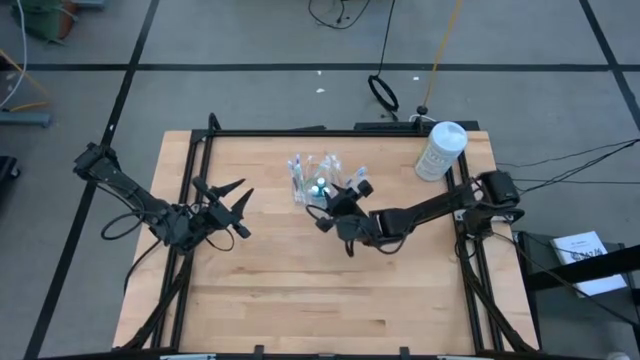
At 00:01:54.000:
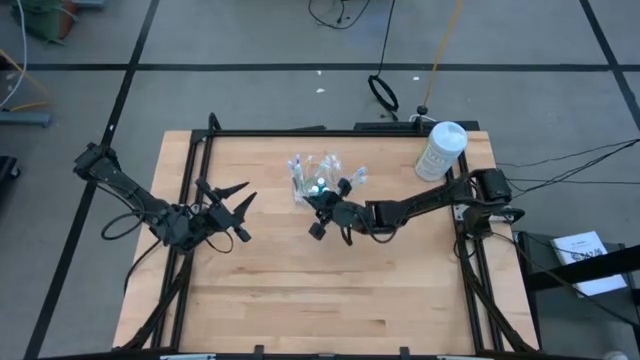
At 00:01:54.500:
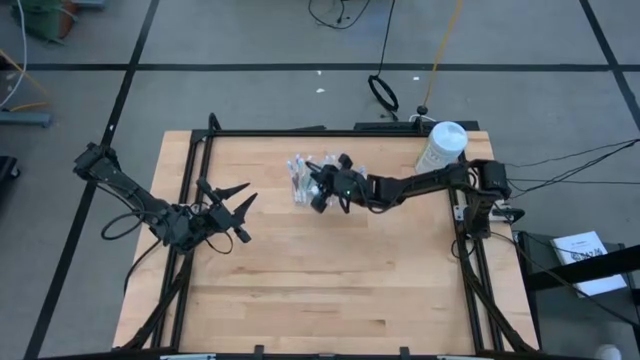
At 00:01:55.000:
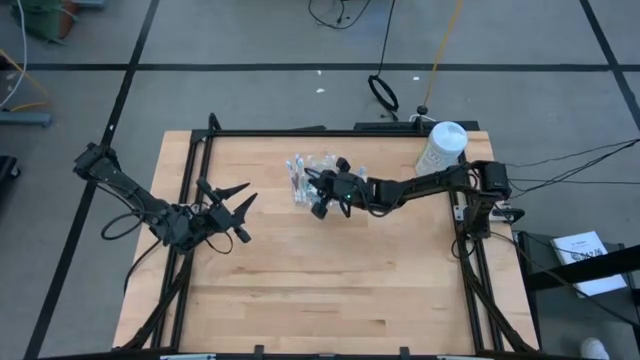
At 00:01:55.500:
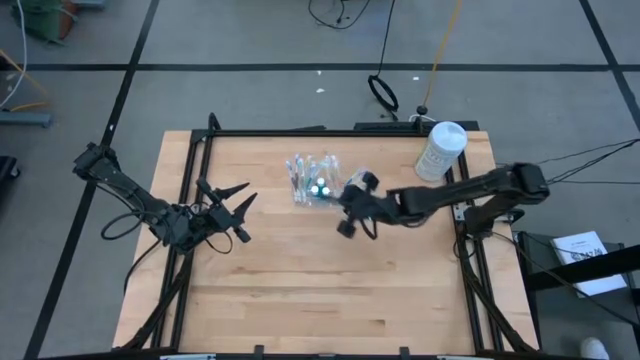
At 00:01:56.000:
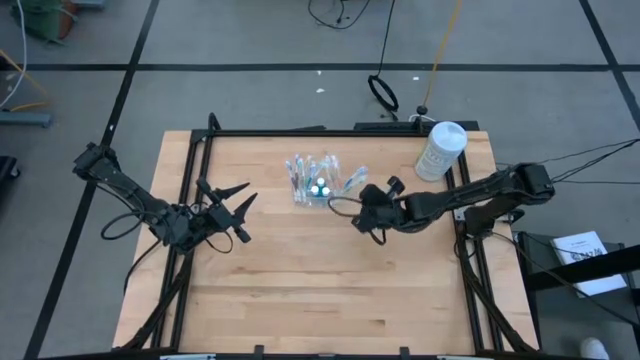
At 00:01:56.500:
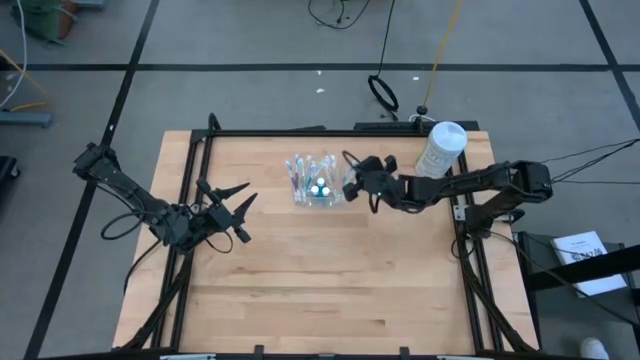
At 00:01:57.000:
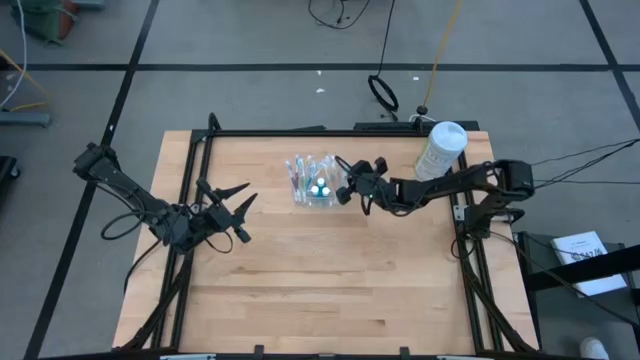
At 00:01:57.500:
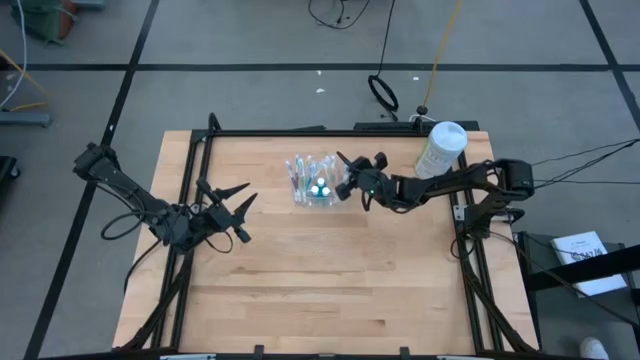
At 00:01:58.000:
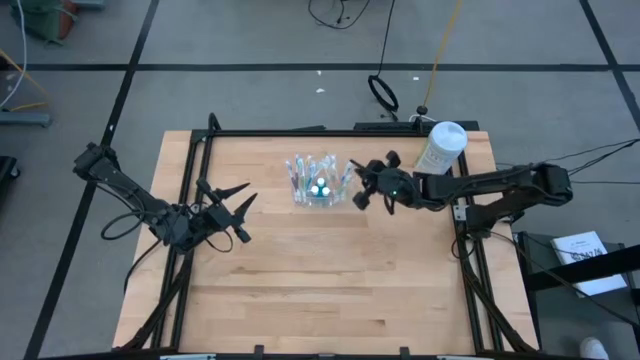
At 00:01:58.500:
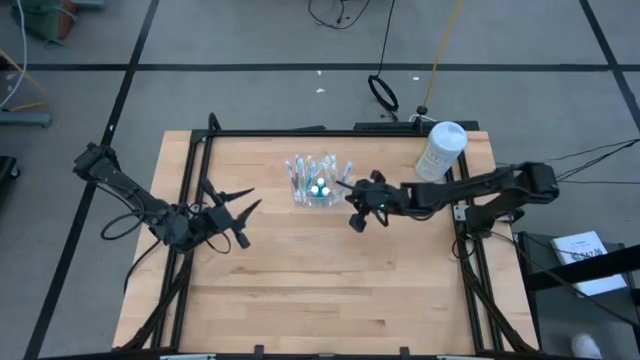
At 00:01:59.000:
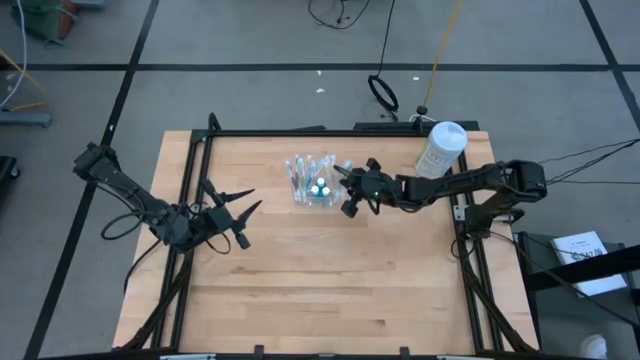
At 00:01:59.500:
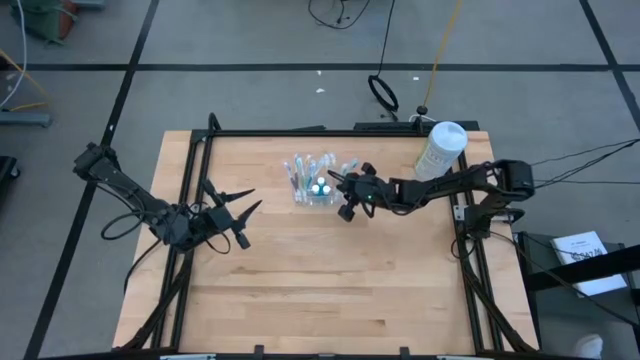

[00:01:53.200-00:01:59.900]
Task: Pick & Place Toothbrushes
Adjust the toothbrushes in the transparent organizer

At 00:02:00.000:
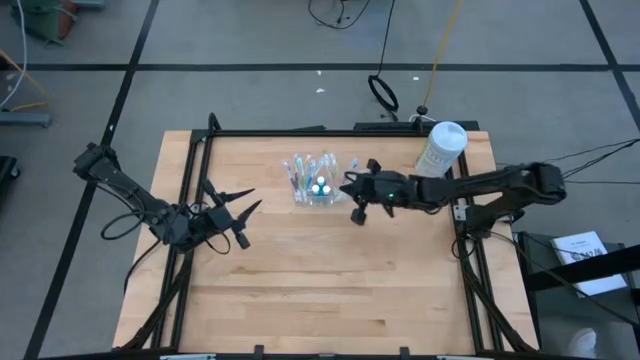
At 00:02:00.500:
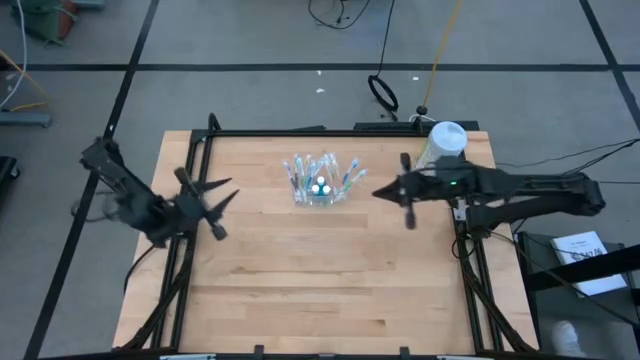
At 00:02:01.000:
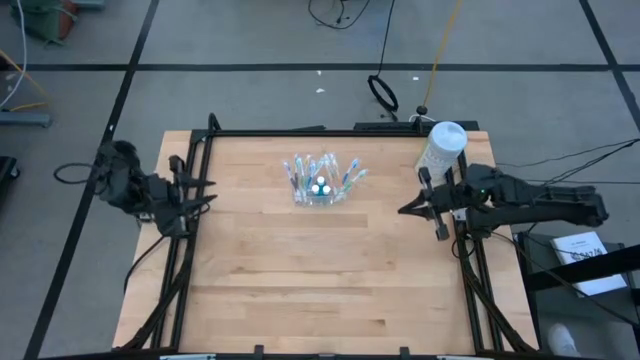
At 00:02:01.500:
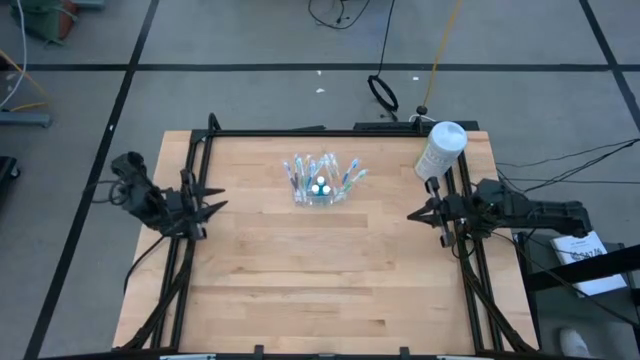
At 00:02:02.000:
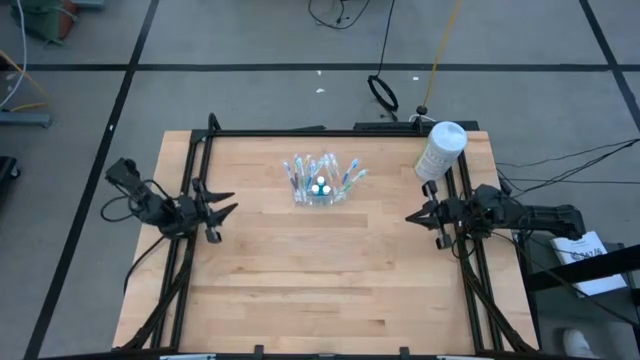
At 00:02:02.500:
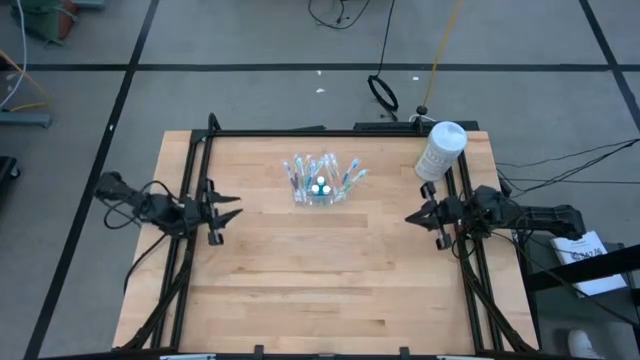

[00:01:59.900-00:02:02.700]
Return to Home Position

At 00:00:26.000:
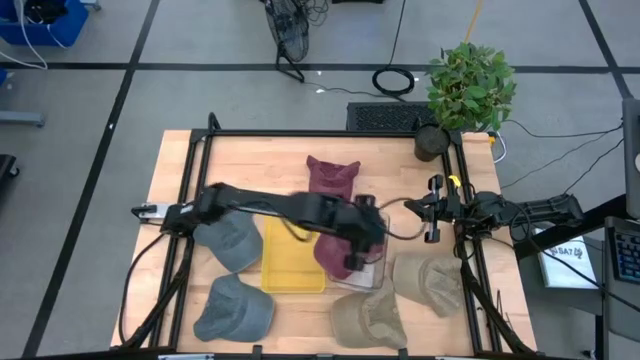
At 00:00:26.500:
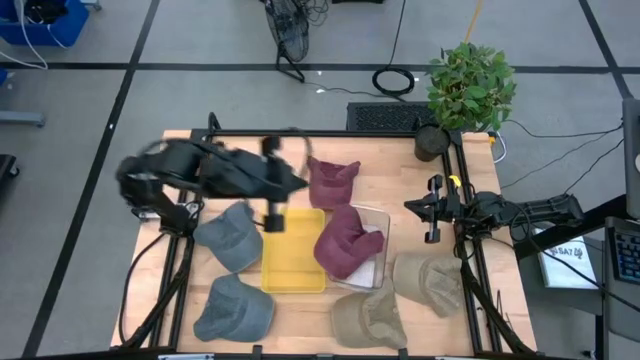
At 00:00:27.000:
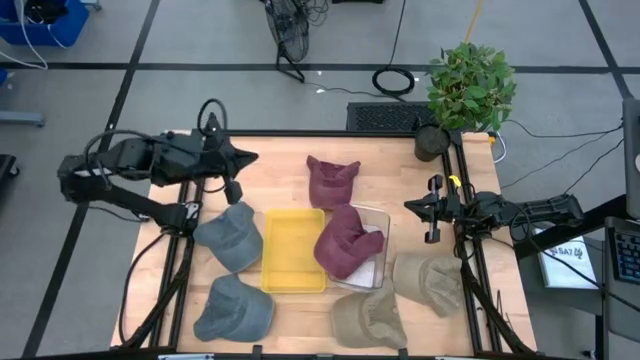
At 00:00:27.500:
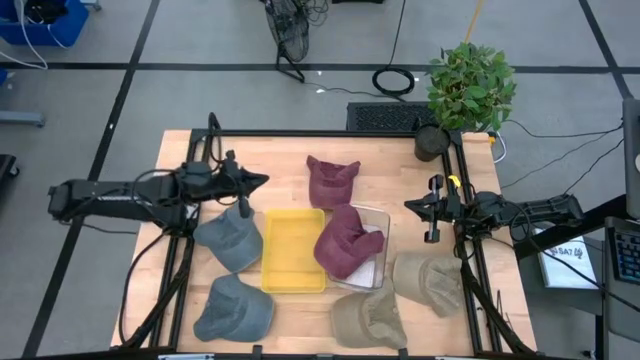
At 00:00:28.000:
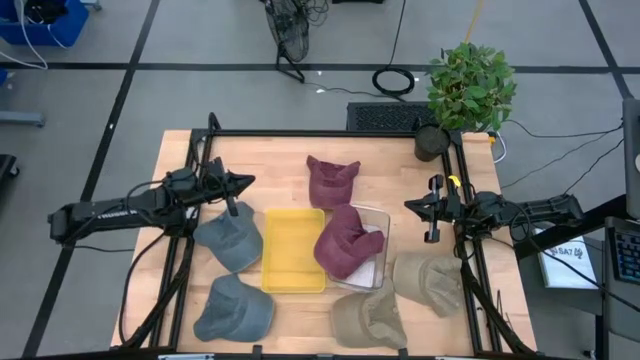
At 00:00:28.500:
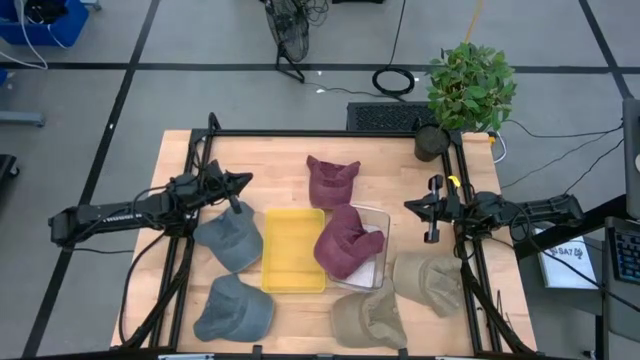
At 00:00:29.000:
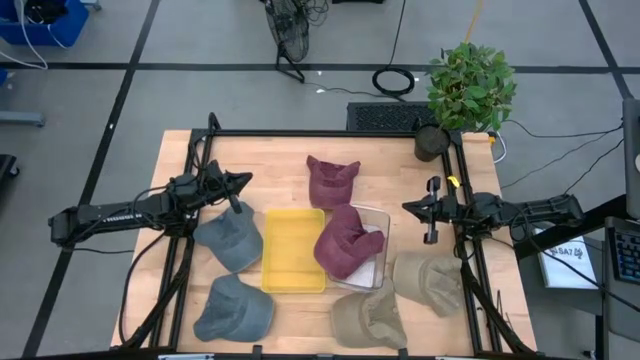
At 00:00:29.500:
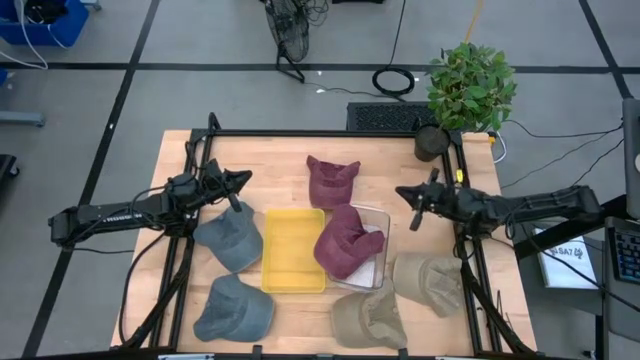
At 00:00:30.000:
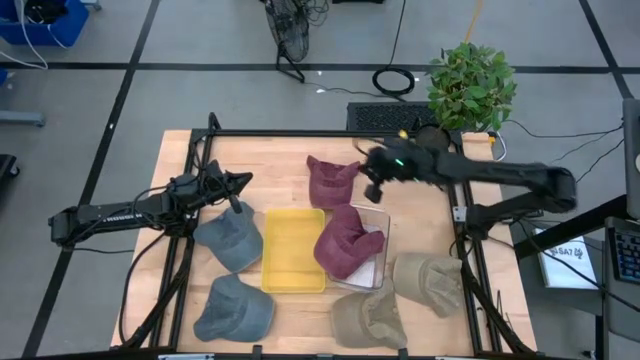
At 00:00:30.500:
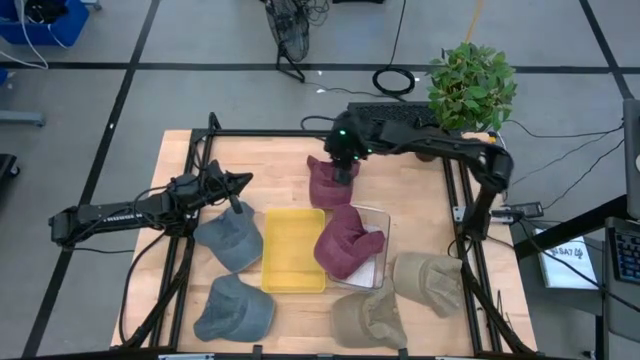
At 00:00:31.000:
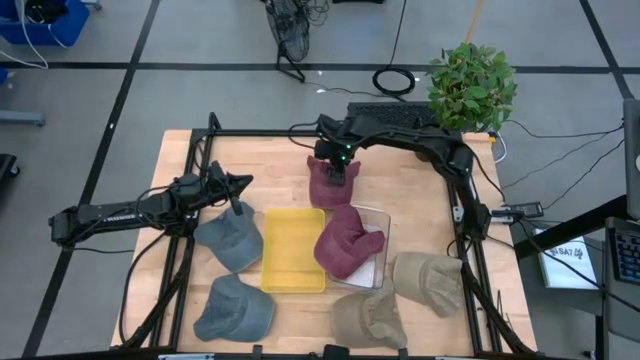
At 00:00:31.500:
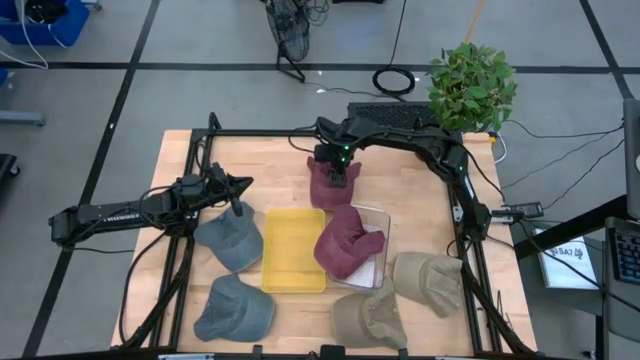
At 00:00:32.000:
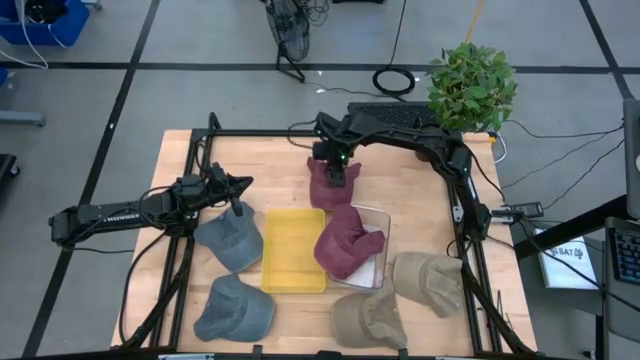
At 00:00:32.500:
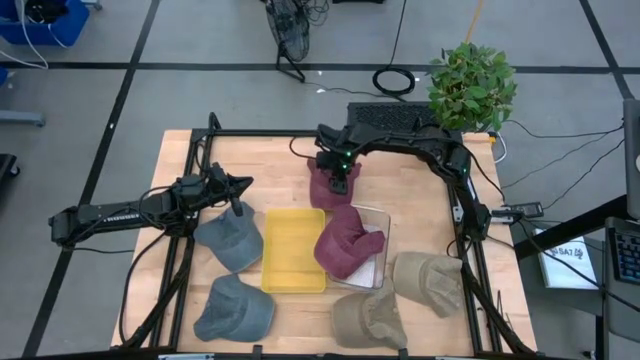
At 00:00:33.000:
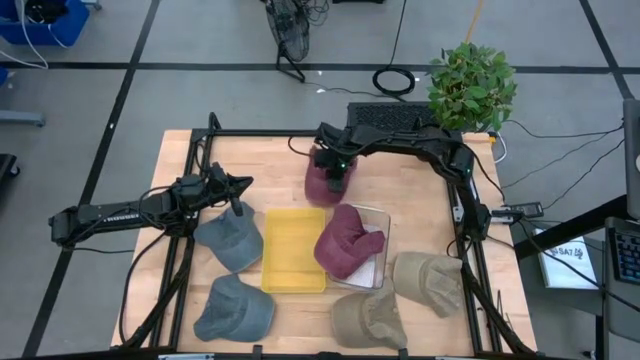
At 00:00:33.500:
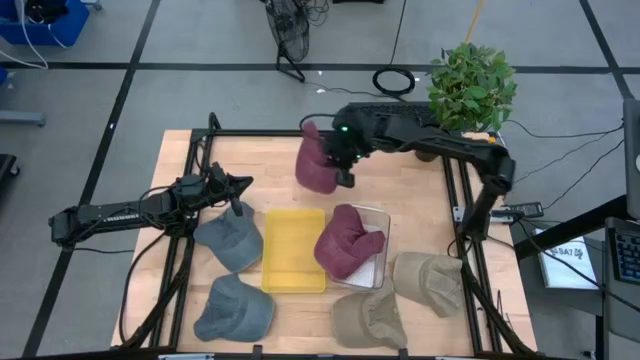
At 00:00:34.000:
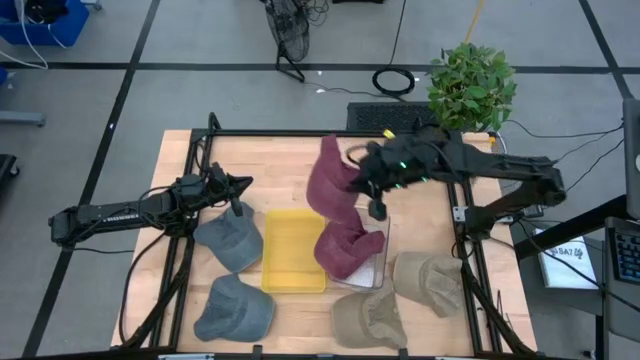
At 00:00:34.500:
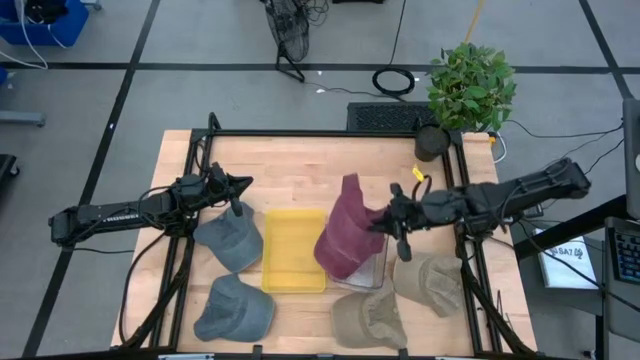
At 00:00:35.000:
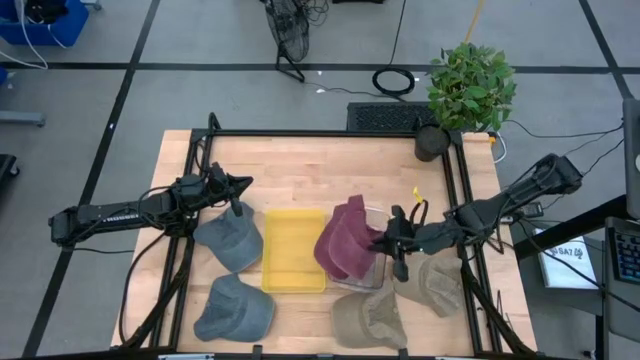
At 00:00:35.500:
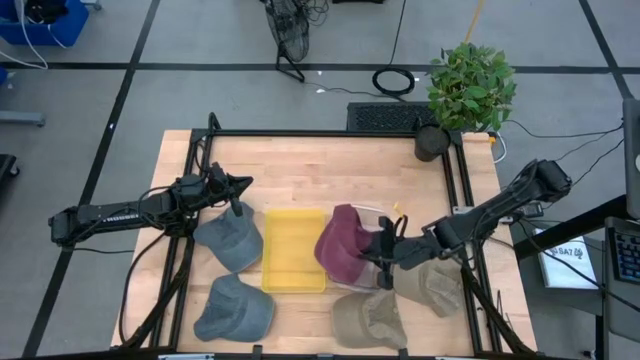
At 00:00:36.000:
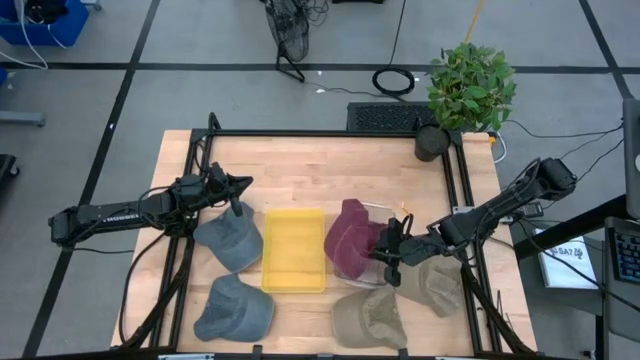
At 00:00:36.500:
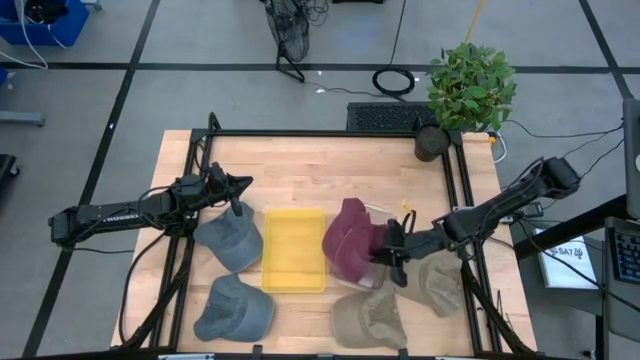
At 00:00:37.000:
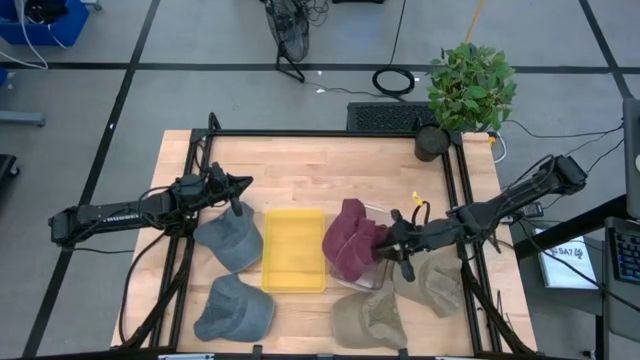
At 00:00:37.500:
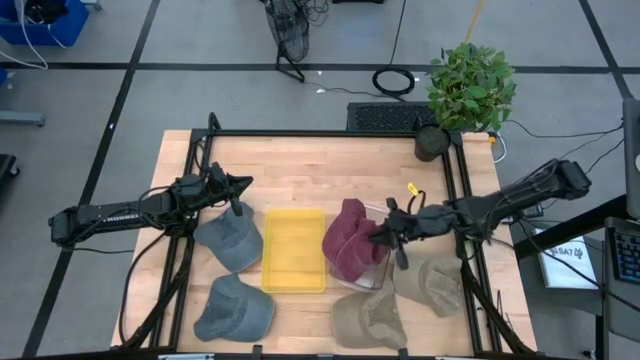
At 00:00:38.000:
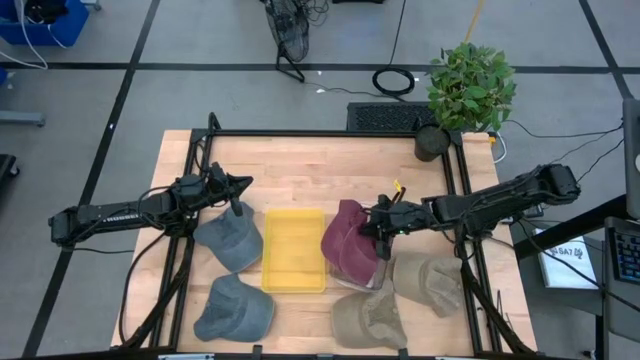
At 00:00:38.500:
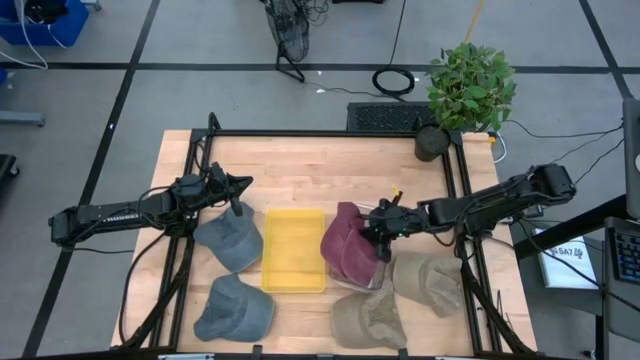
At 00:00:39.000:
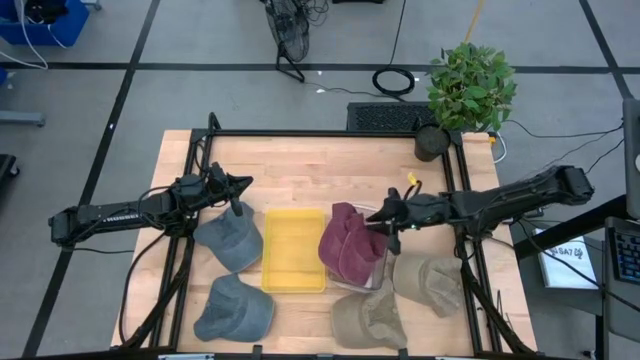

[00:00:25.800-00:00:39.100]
Task: Pick & Place hat
Put the red cap into the transparent bin
